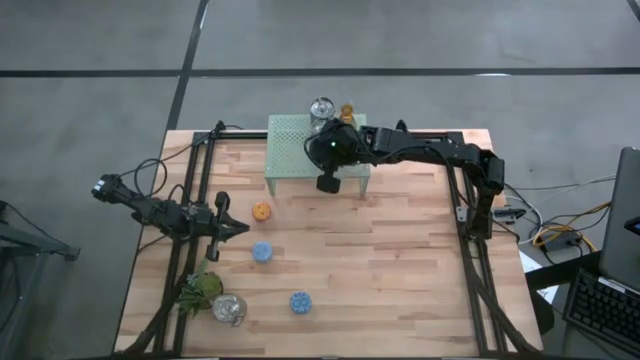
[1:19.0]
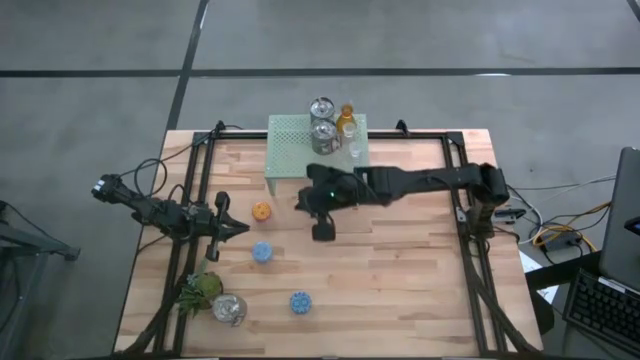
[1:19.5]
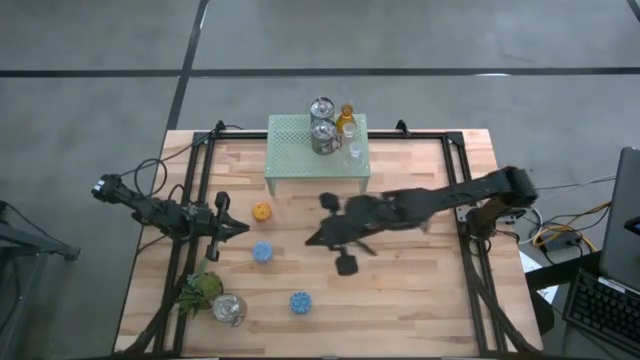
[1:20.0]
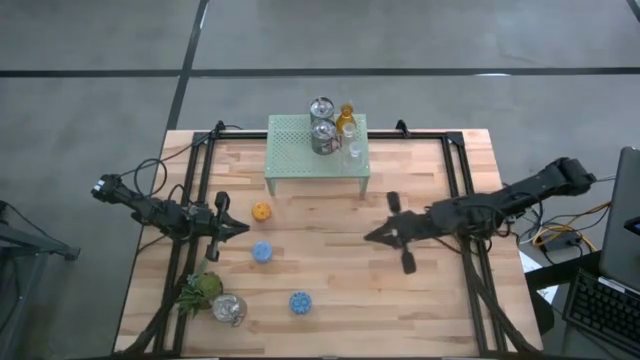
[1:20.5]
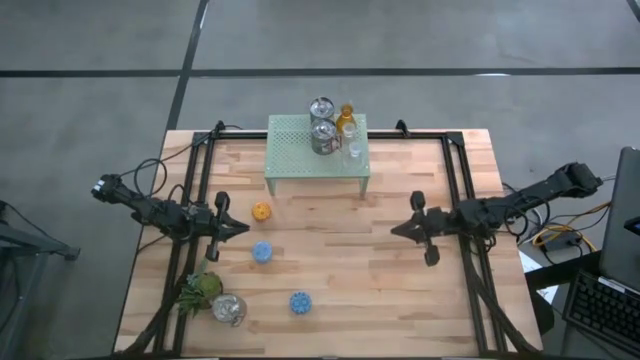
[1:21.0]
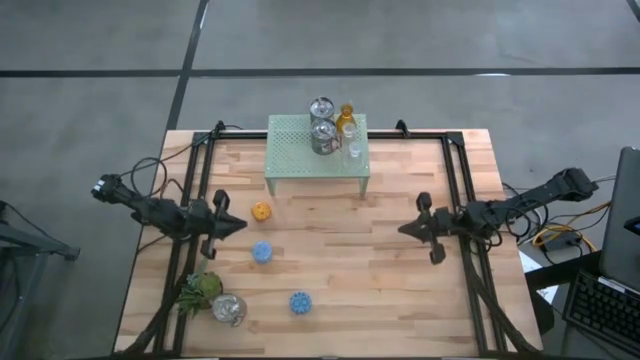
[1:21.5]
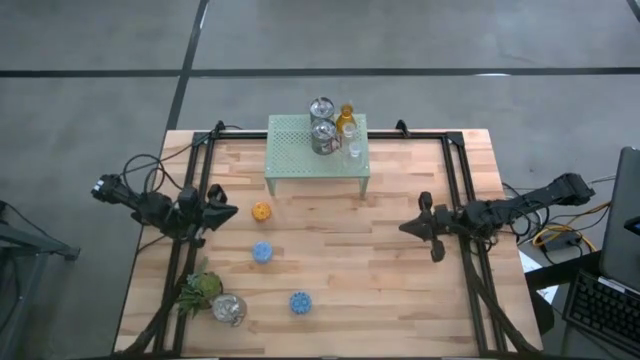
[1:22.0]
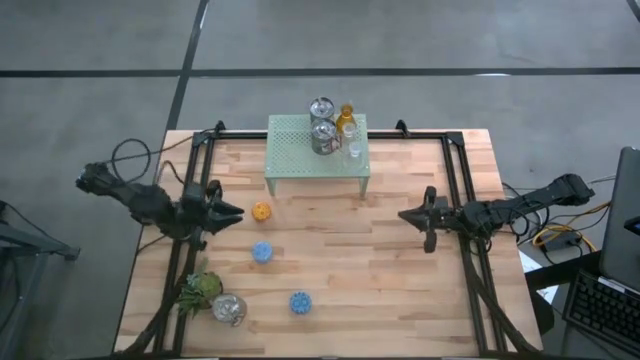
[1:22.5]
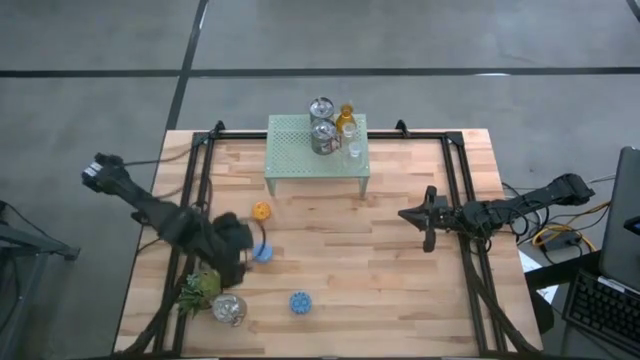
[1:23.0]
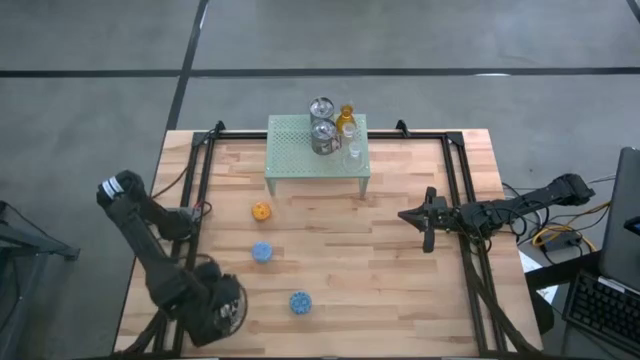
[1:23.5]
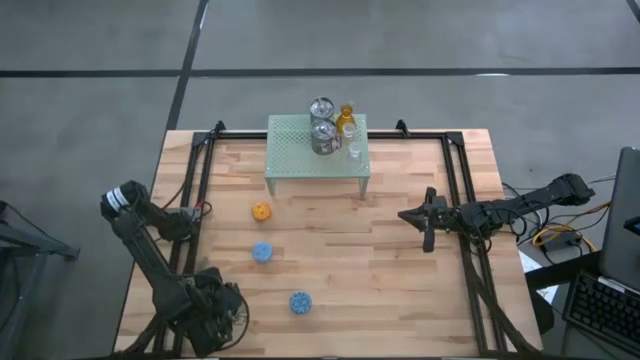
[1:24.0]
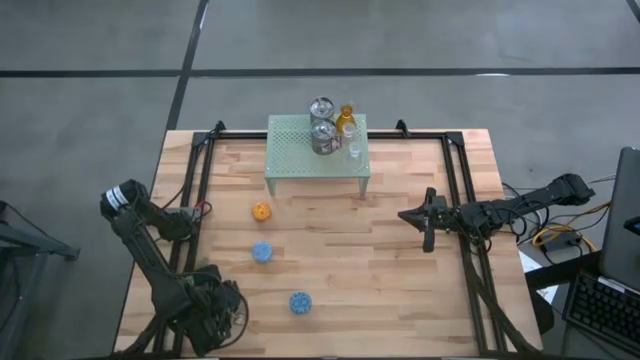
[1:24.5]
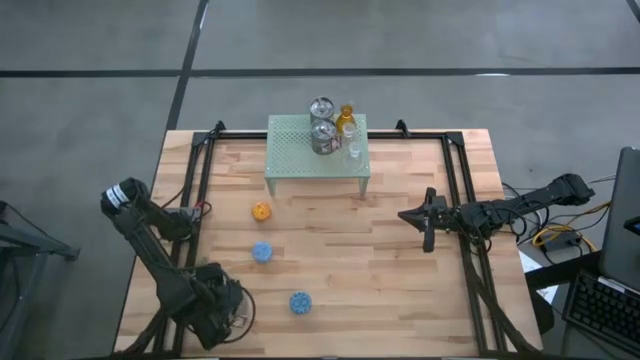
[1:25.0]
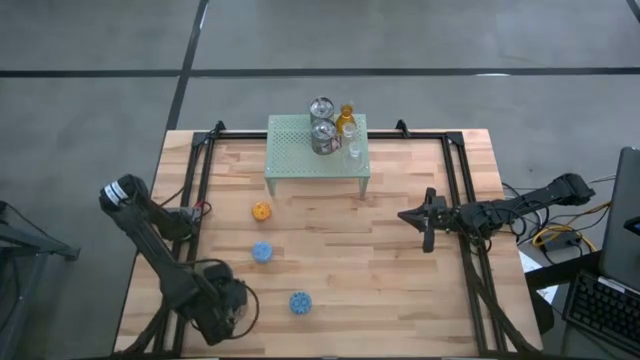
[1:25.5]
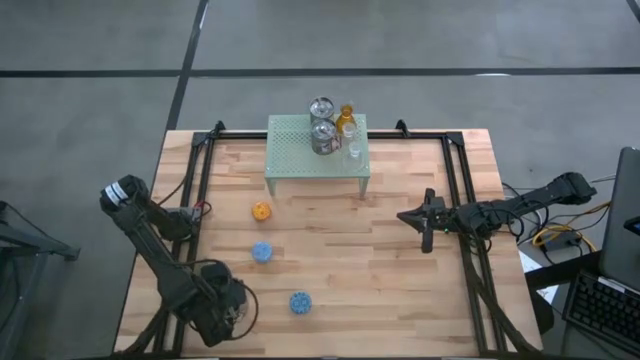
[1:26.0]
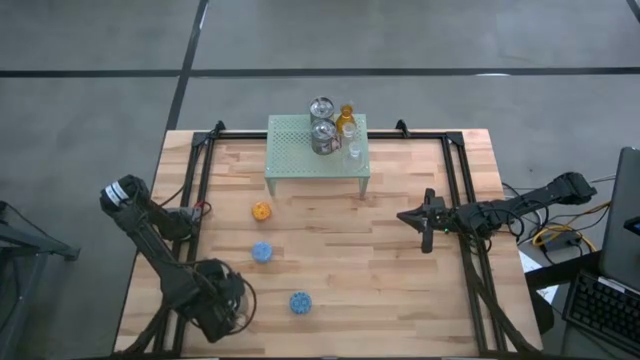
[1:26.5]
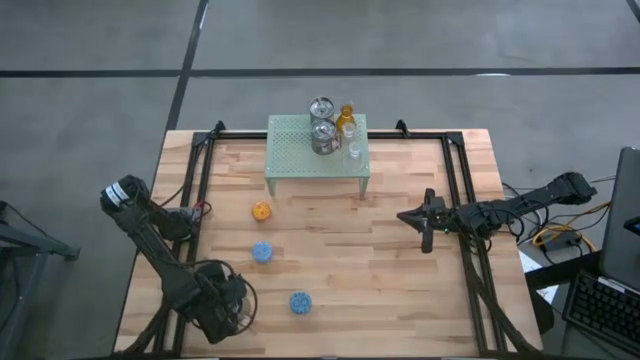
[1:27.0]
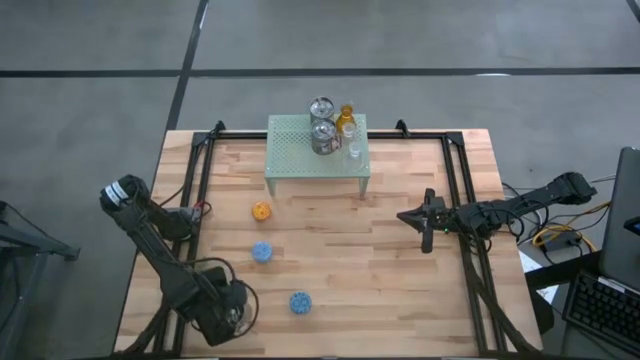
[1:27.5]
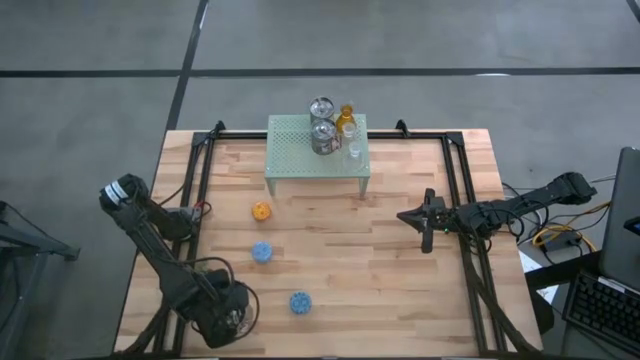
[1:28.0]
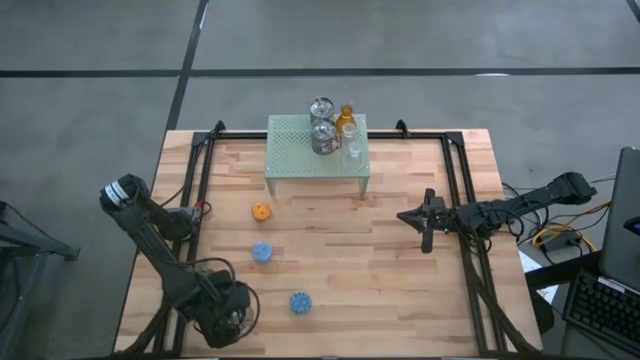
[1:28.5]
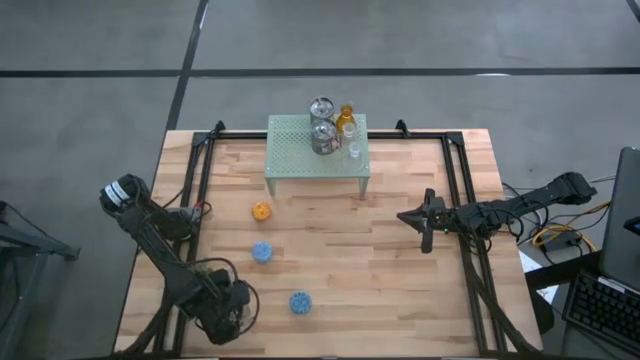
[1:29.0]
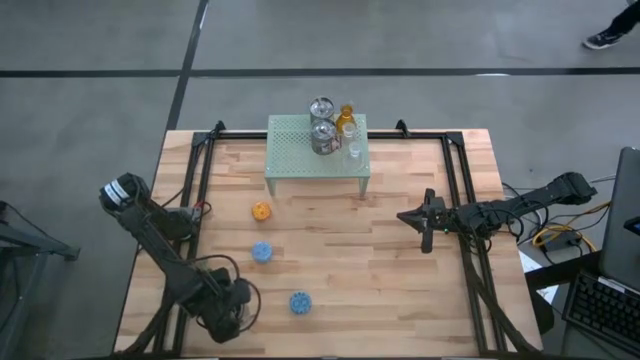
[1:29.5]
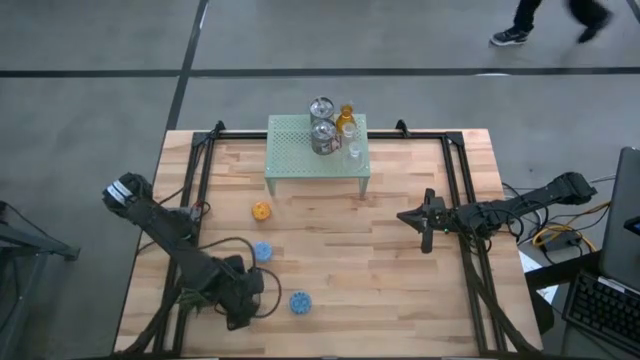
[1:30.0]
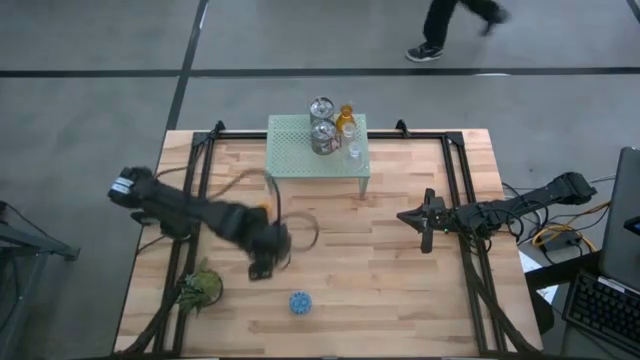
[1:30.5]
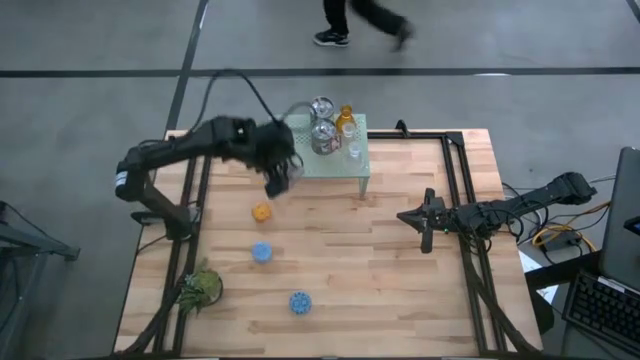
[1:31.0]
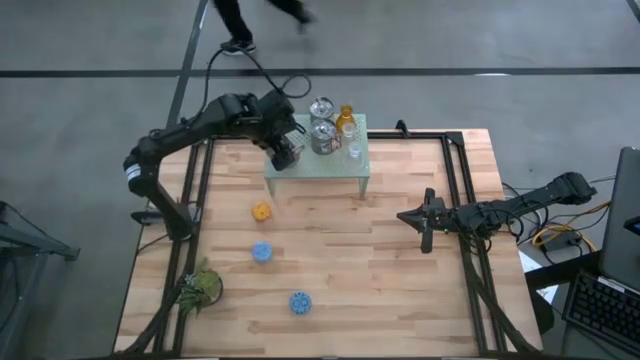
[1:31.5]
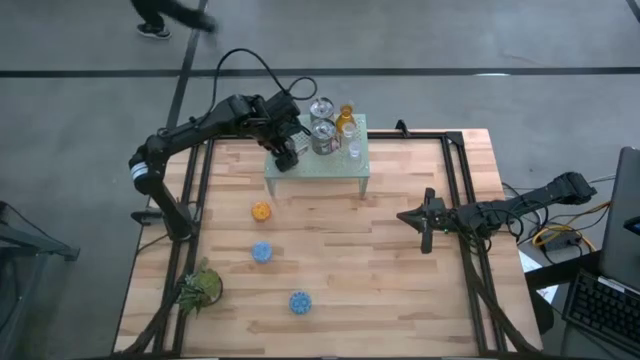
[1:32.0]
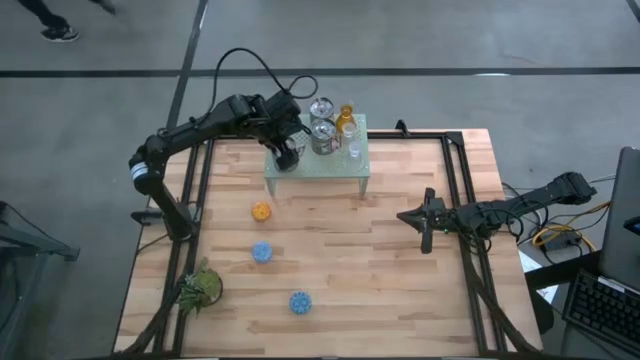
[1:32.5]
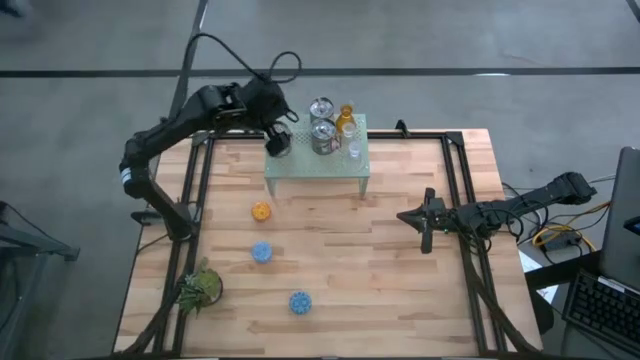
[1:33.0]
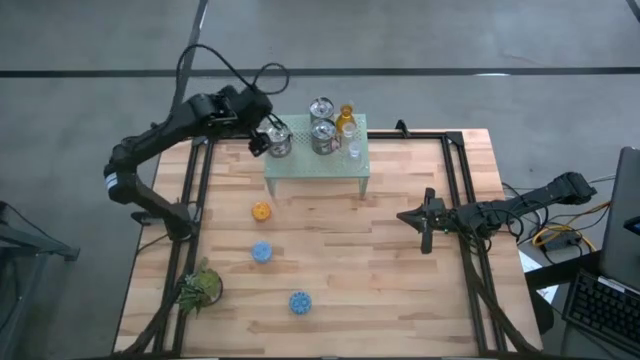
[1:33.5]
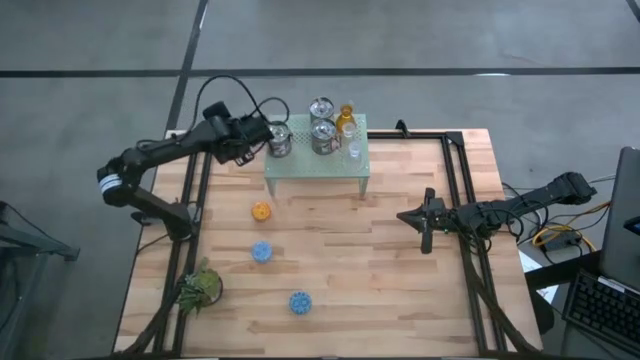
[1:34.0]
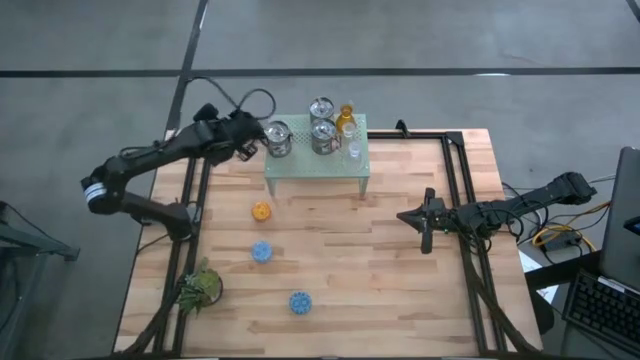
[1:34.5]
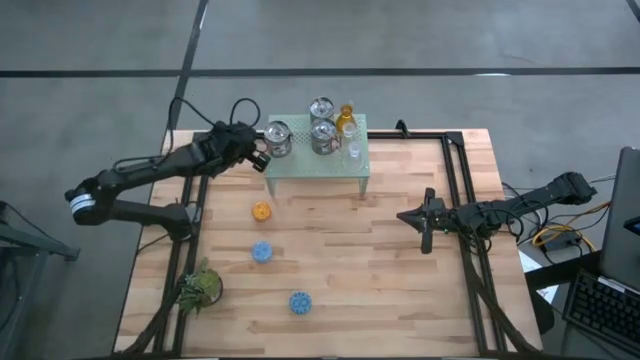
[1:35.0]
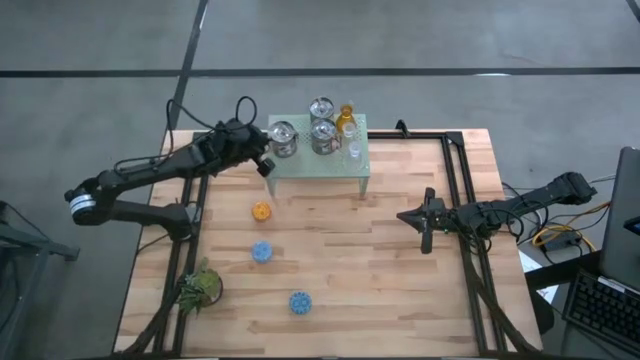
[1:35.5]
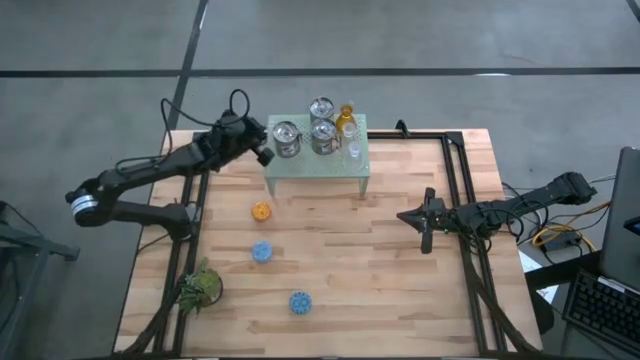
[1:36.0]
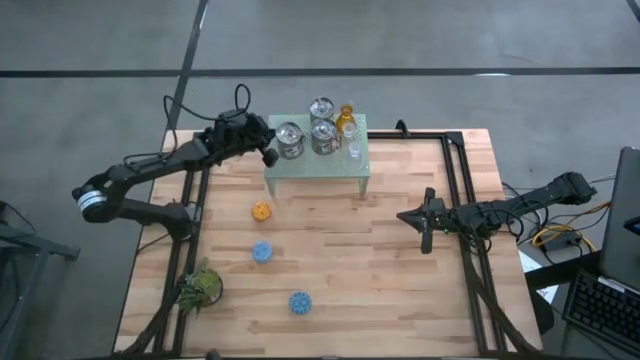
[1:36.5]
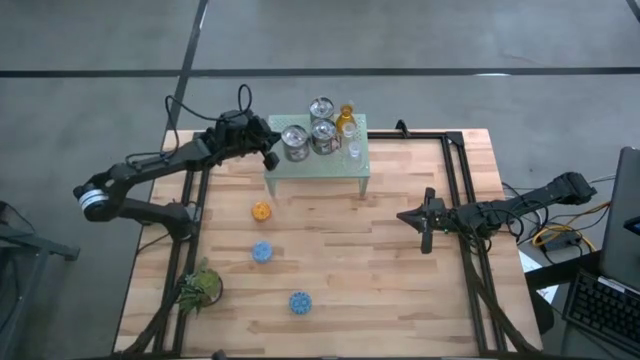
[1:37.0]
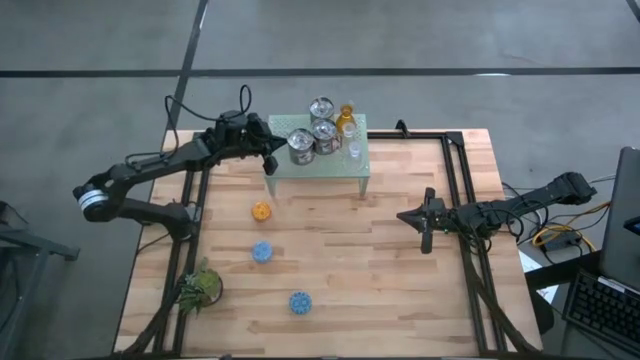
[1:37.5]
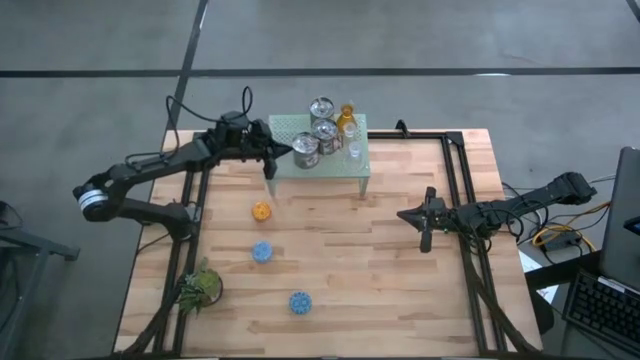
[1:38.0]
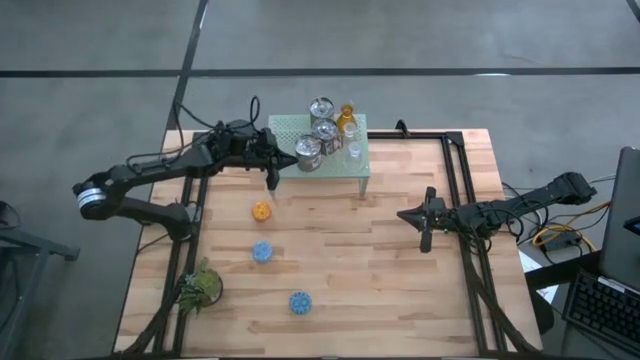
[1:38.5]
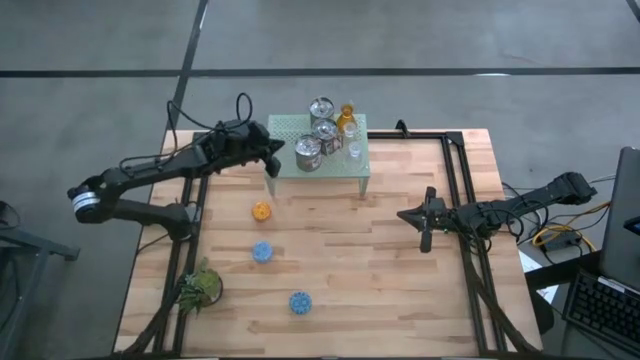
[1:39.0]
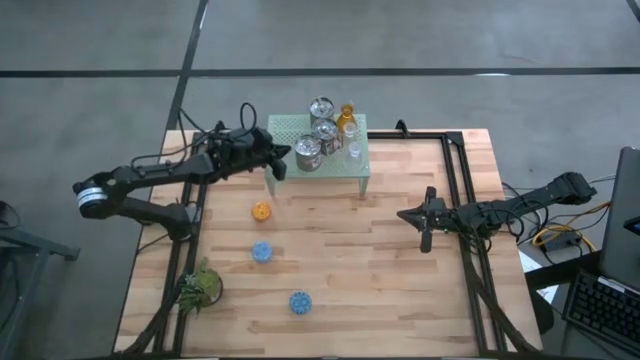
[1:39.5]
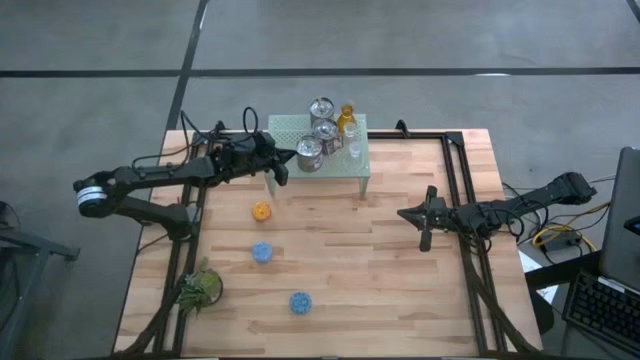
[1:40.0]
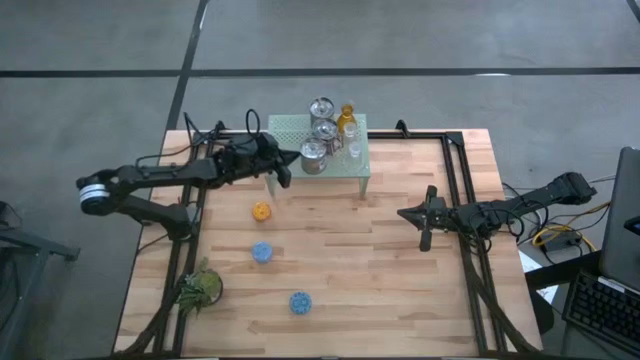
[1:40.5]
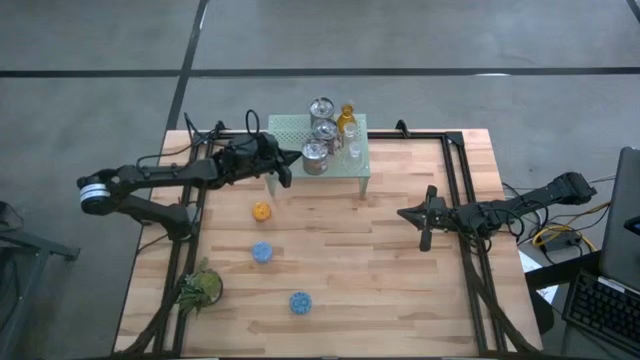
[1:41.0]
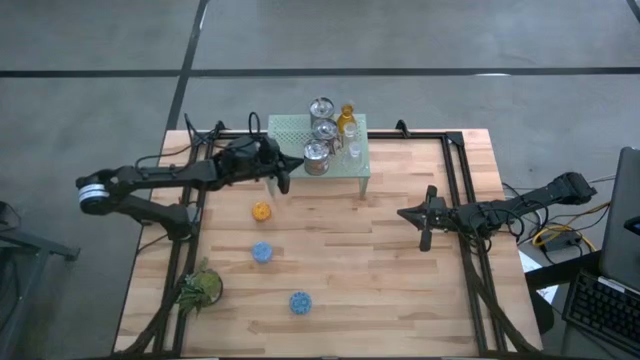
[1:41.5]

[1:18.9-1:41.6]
Task: Pick & Place candle stick holders
Put the brown scented candle on the shelf
